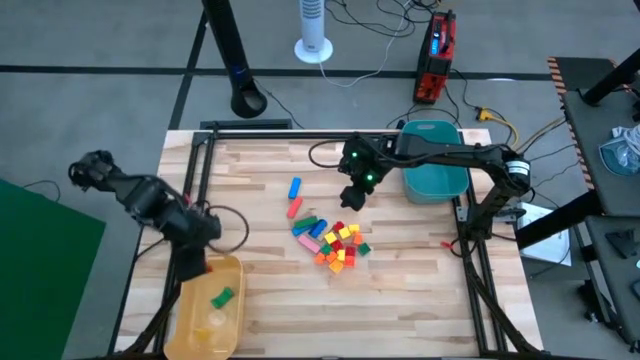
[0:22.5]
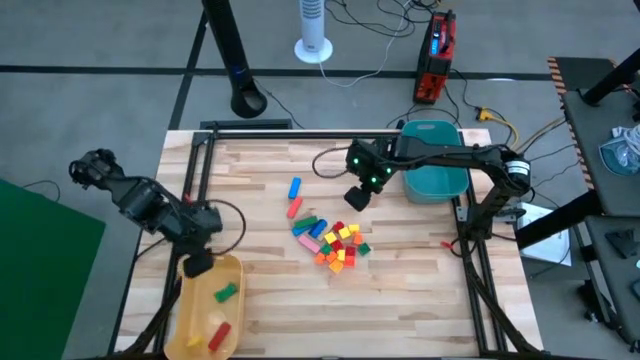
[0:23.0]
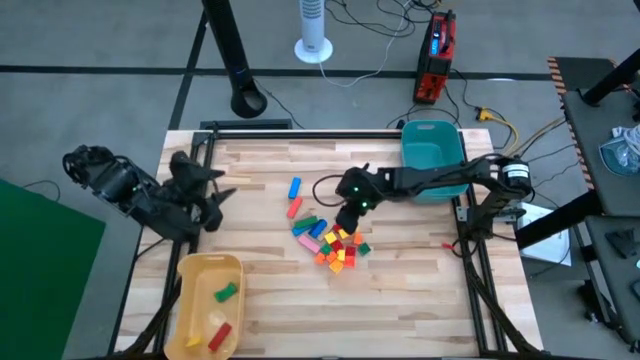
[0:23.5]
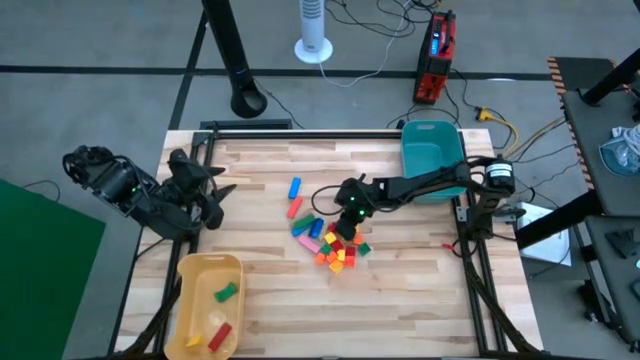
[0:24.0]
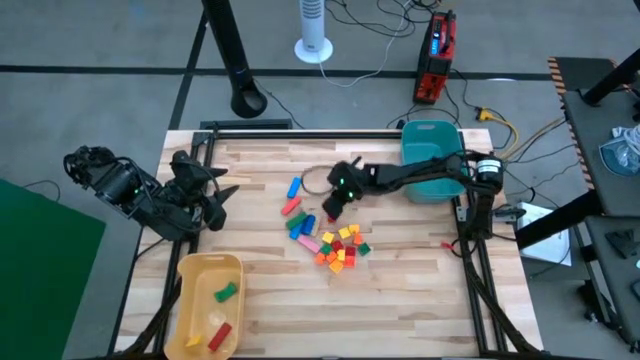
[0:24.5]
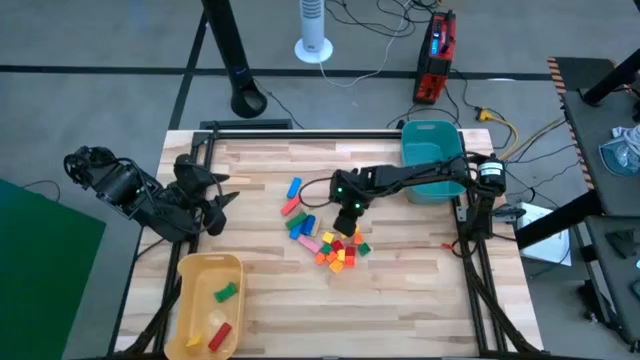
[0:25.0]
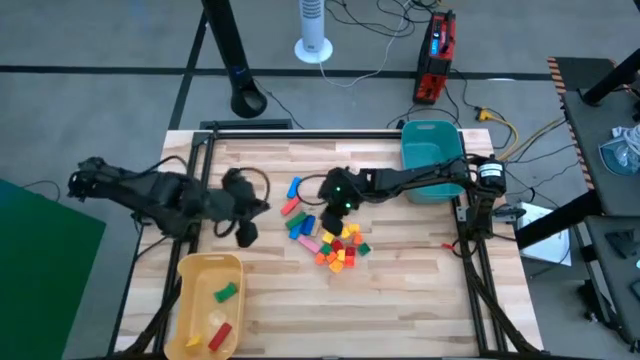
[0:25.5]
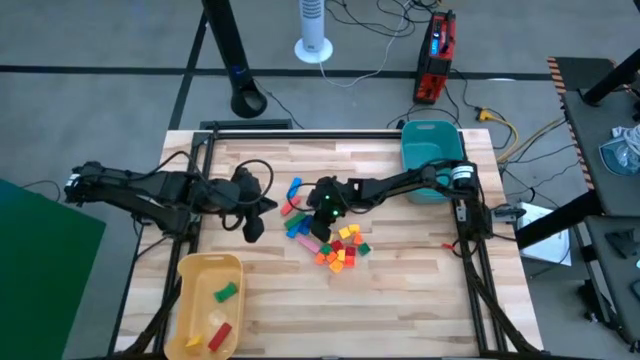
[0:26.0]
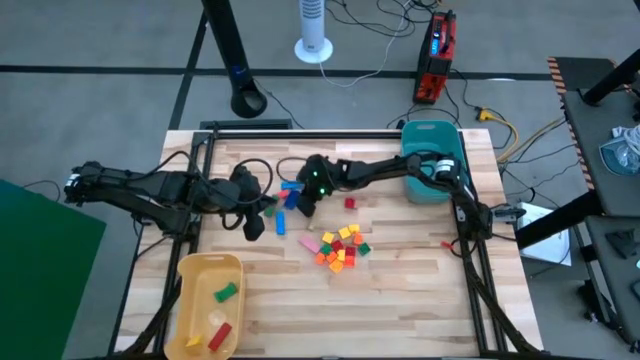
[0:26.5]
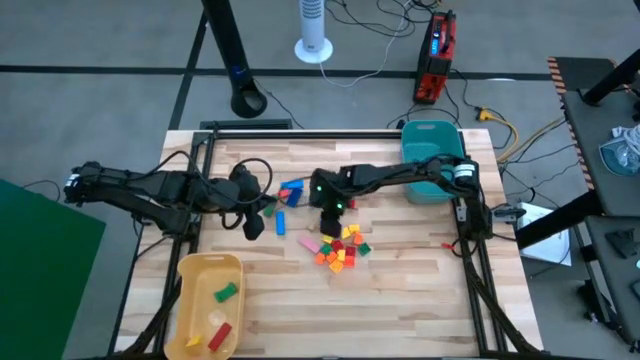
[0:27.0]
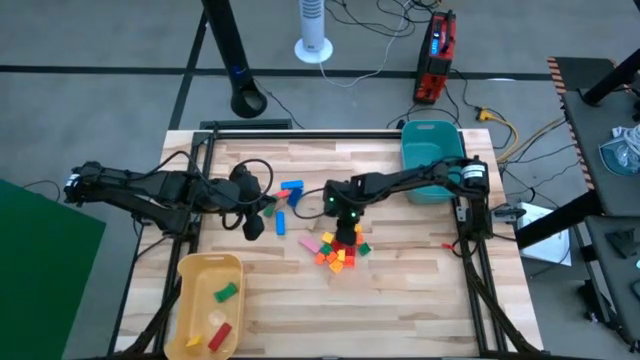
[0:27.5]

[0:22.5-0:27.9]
Task: Sort blocks
Prepare the blocks and game pieces on the table

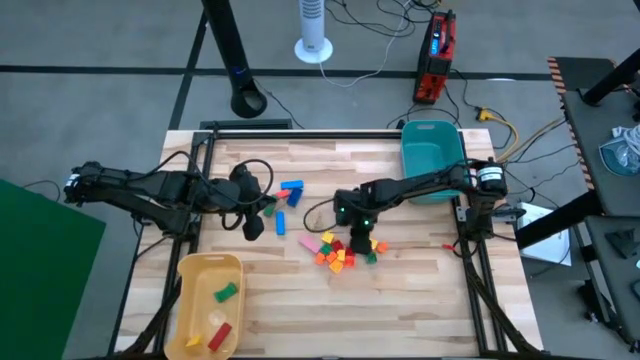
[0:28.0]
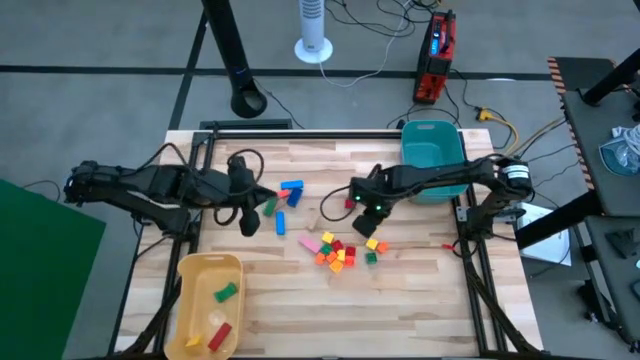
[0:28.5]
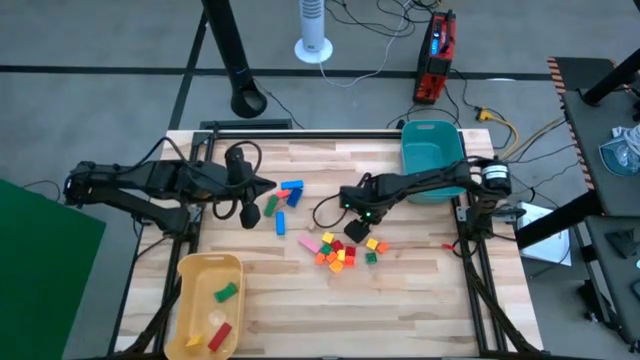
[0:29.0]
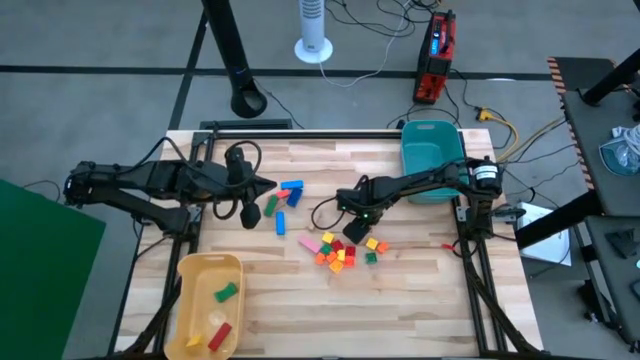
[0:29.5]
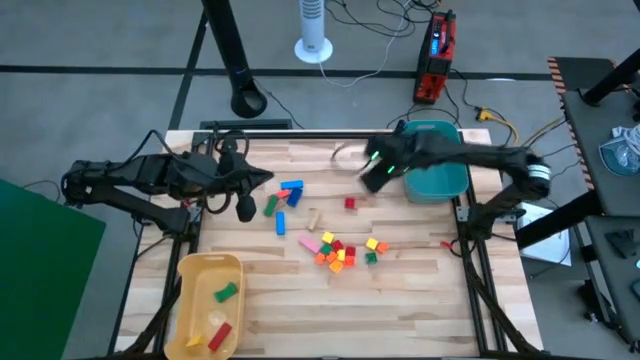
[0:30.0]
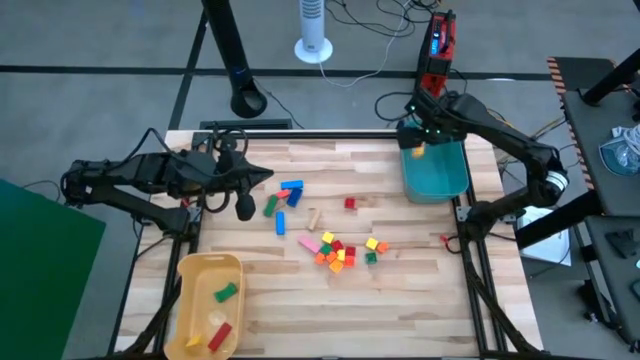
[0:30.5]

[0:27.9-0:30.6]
Put the yellow 4-stud game piece into the green bin

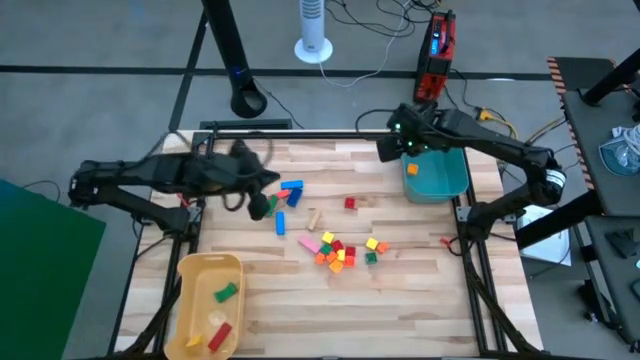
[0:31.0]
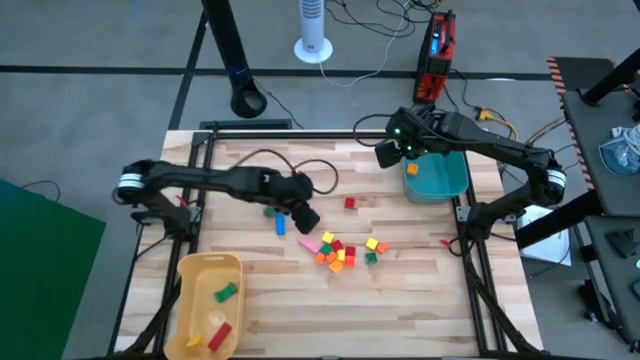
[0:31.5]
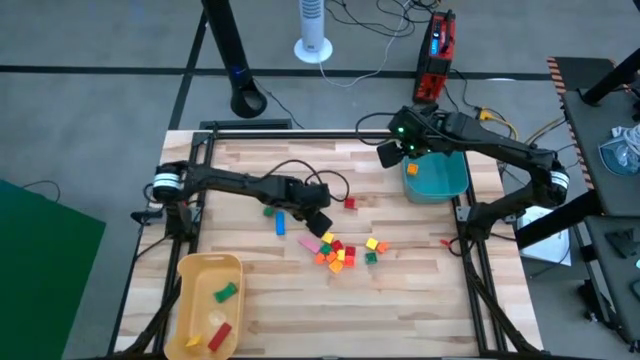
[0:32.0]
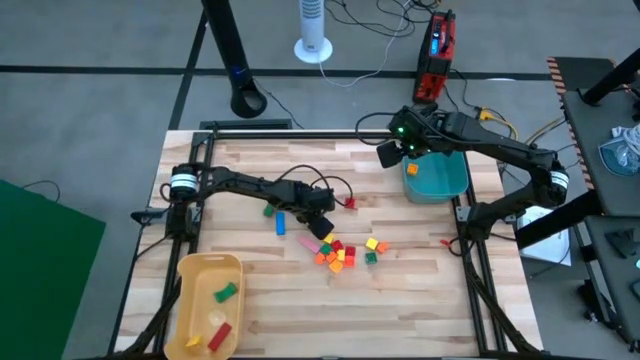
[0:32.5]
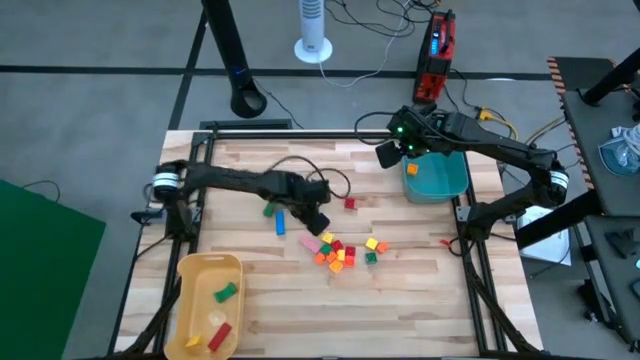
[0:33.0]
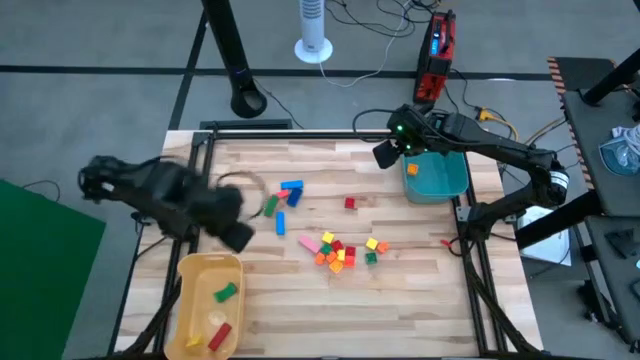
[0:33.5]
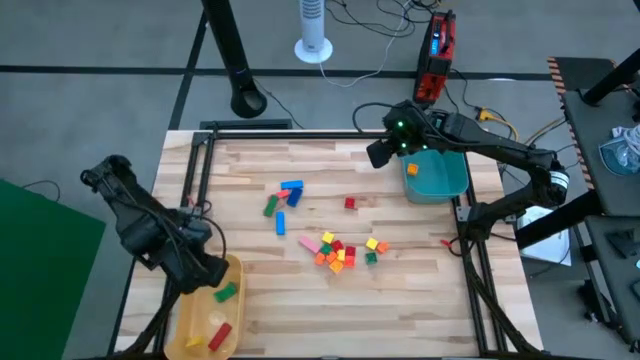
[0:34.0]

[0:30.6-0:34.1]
Put the brown rectangular block into the yellow bin

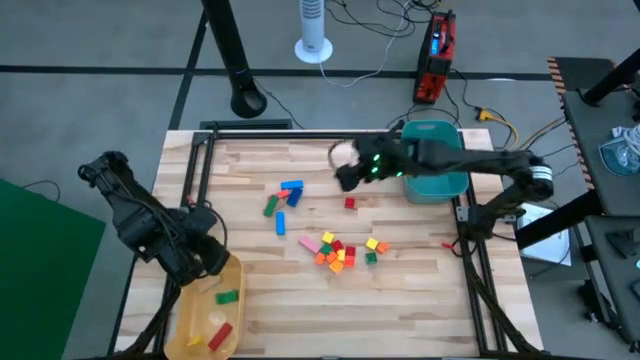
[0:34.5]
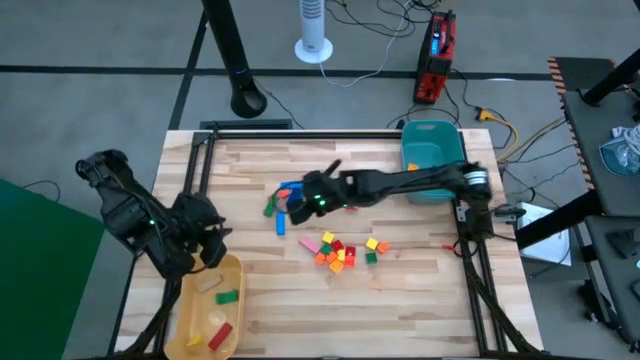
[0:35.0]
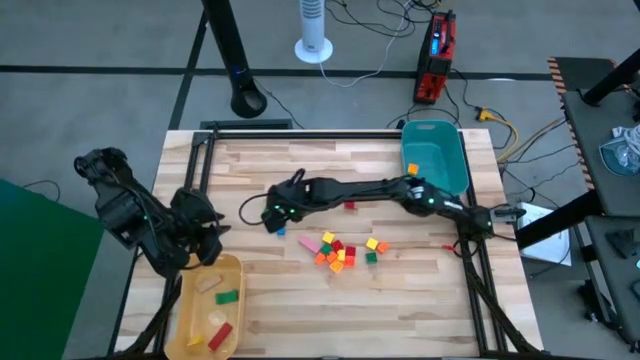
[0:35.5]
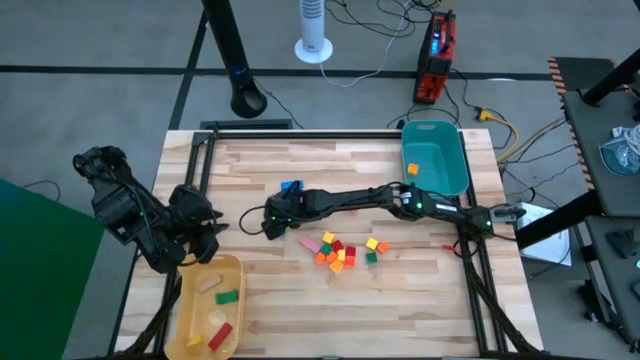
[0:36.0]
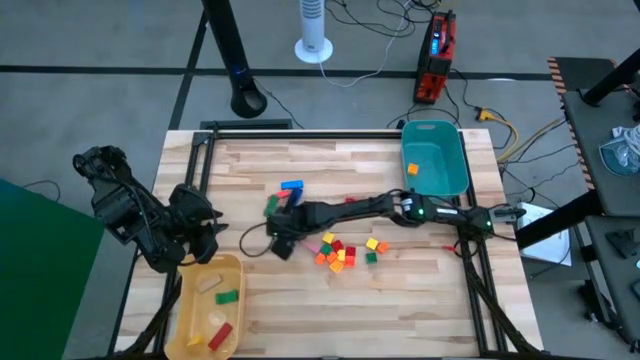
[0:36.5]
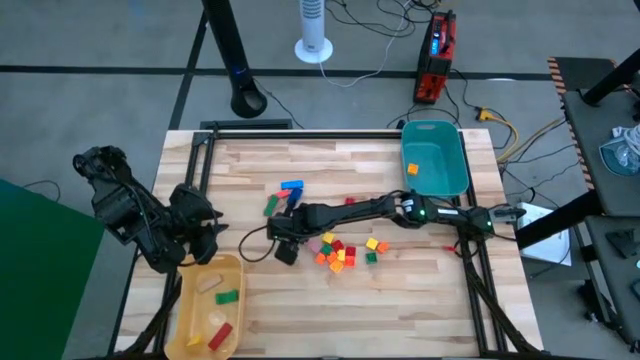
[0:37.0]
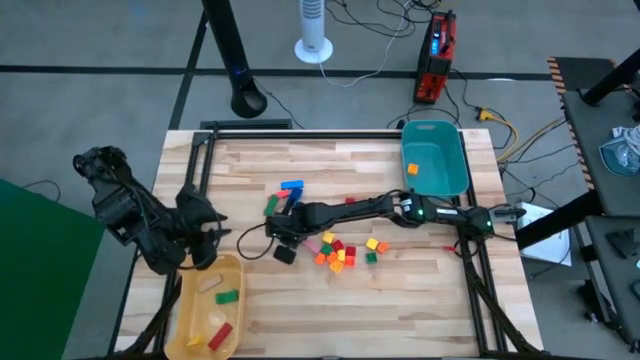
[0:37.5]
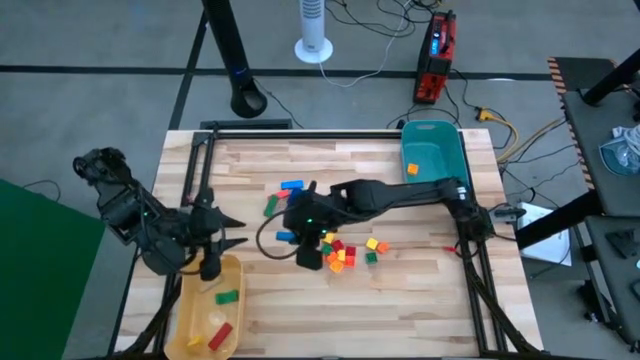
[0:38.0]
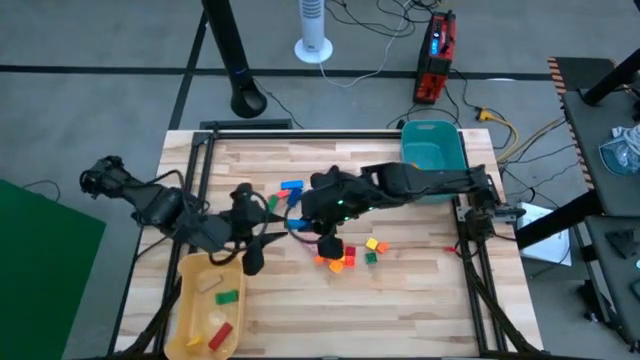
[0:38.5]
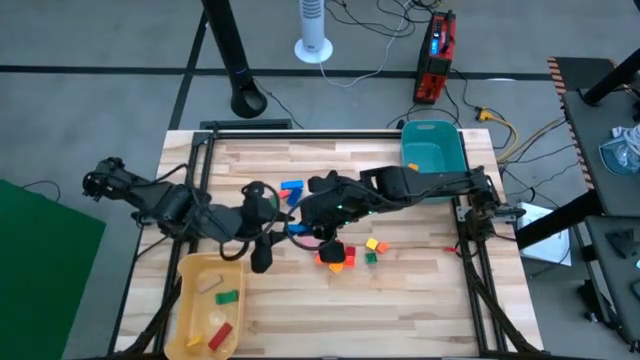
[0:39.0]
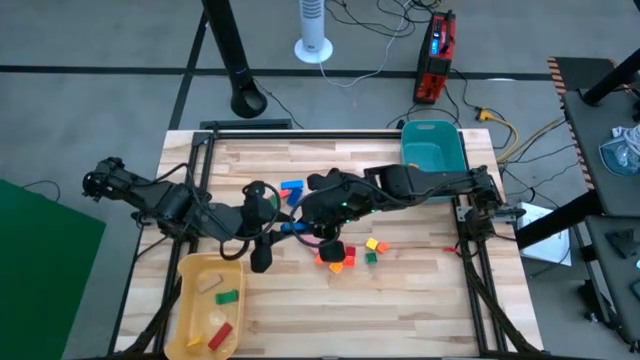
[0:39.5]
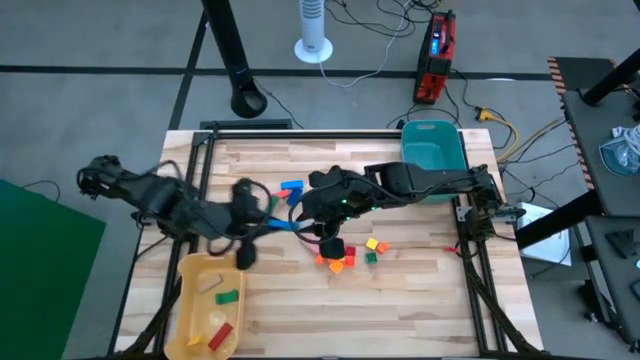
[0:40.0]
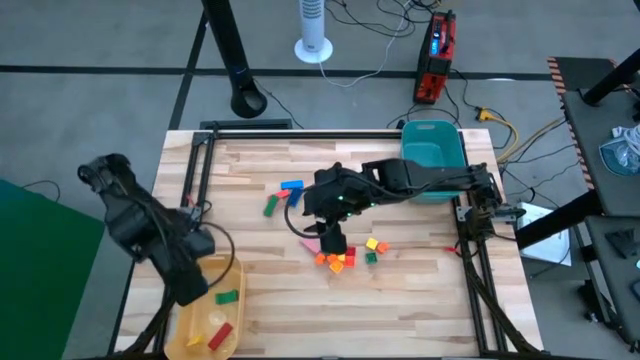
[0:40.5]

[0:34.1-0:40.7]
Put the blue rectangular block into the yellow bin

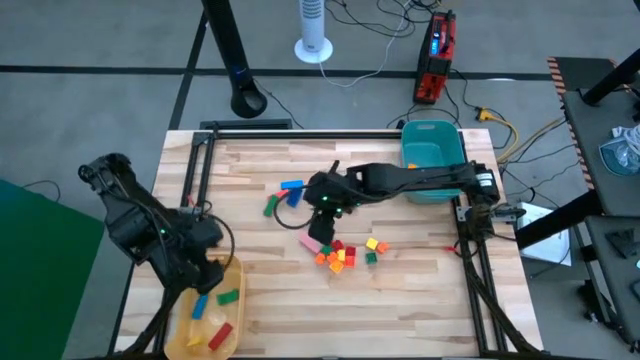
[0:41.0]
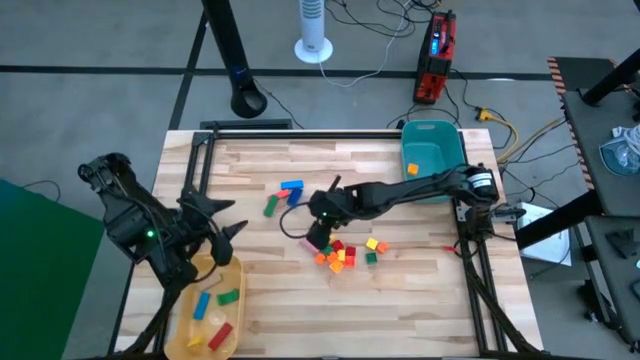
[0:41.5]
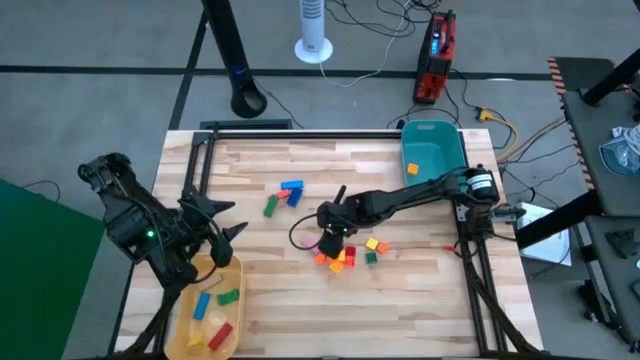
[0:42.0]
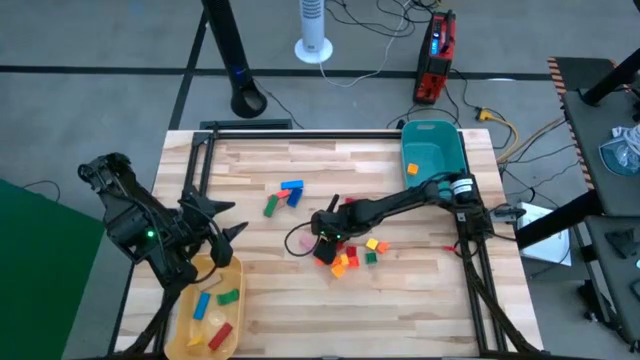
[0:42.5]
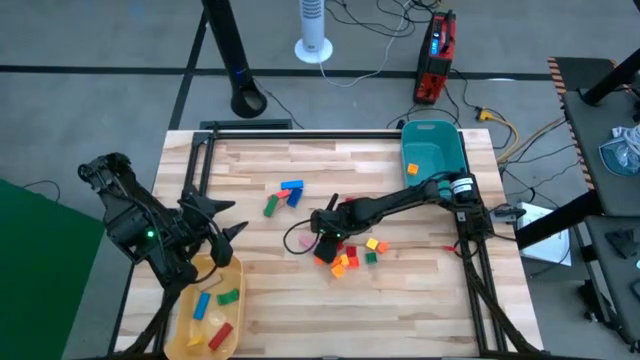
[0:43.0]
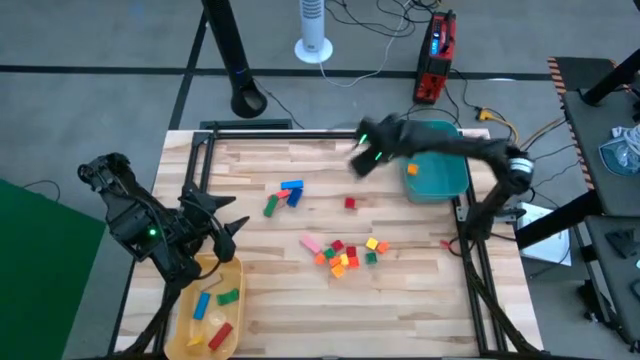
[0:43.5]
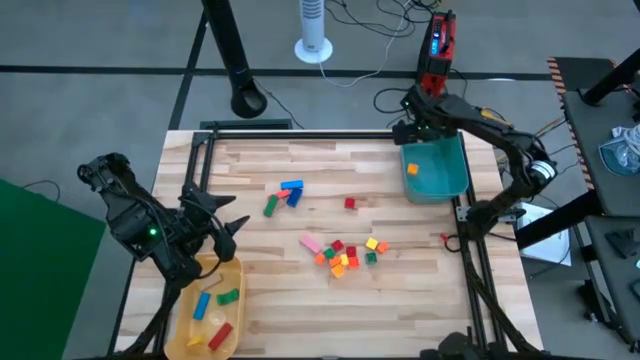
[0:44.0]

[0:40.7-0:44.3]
Put the yellow square block into the green bin
